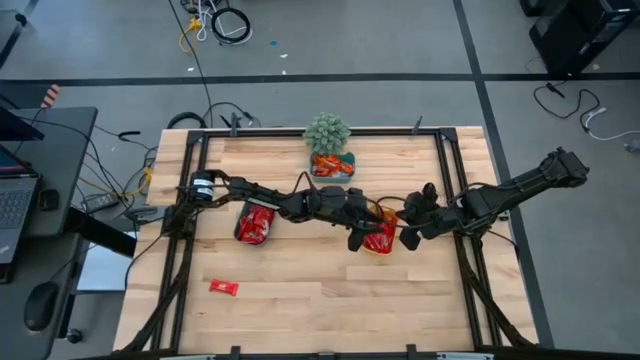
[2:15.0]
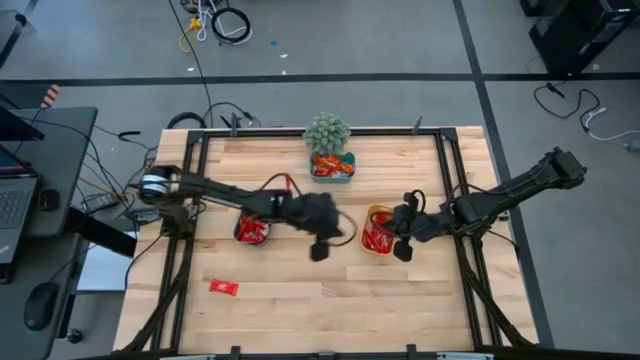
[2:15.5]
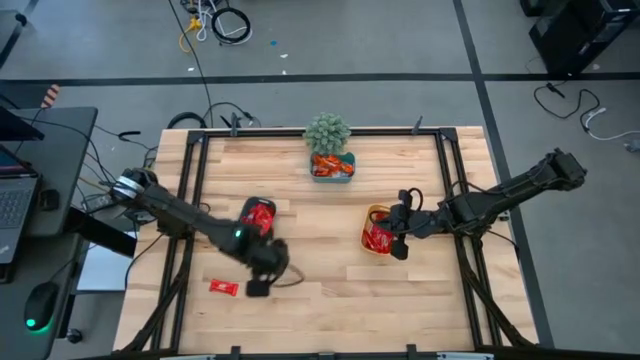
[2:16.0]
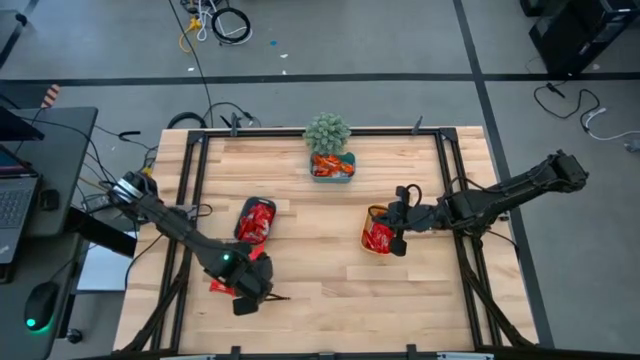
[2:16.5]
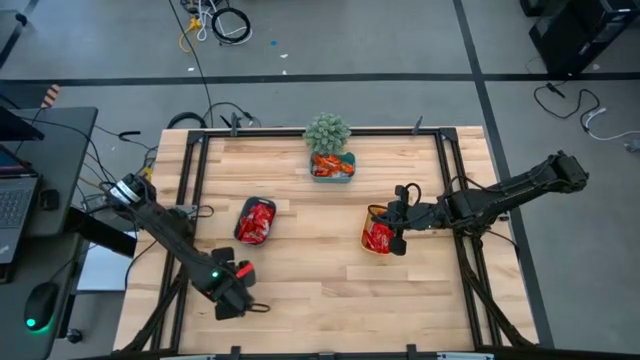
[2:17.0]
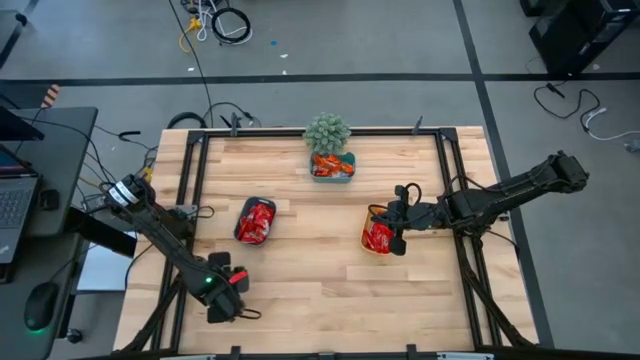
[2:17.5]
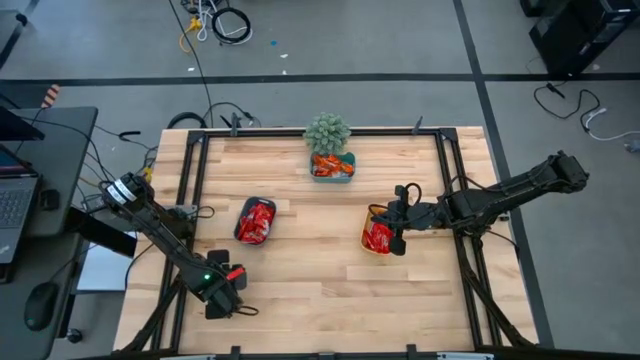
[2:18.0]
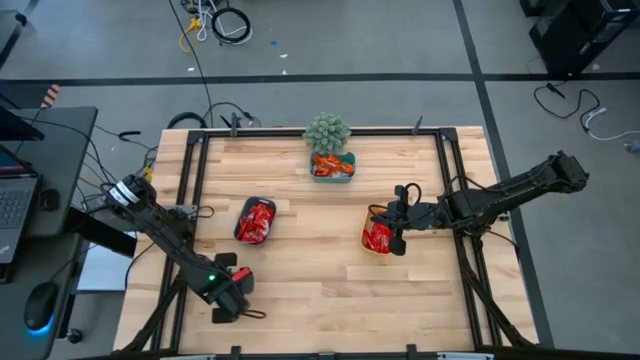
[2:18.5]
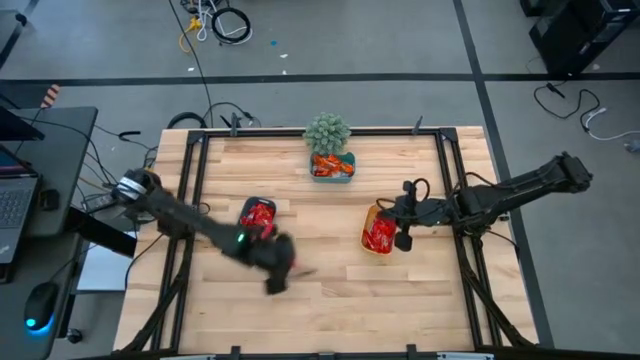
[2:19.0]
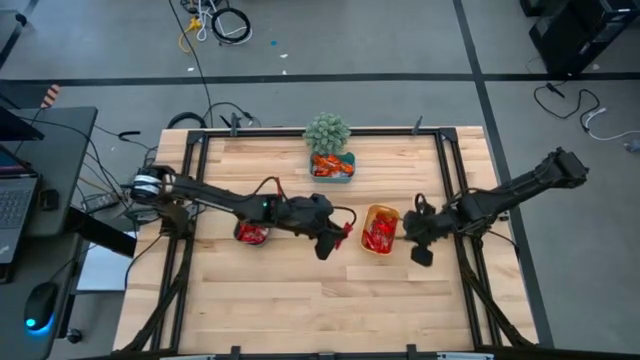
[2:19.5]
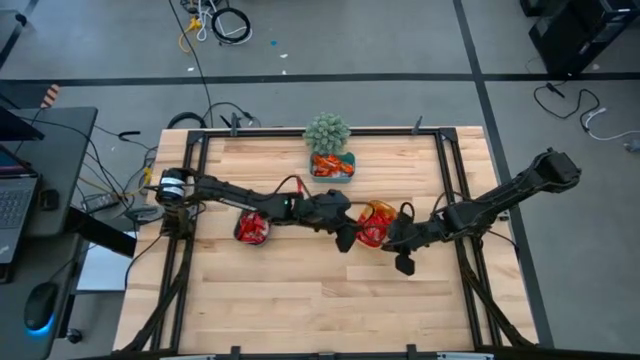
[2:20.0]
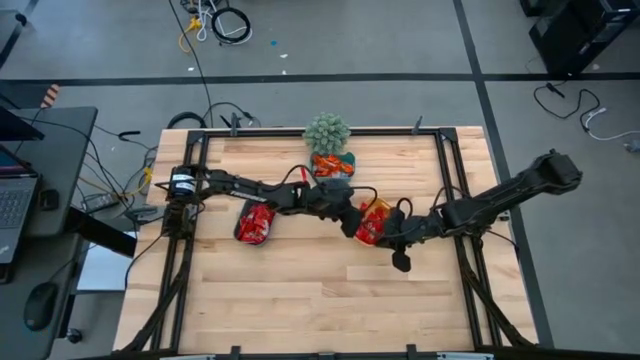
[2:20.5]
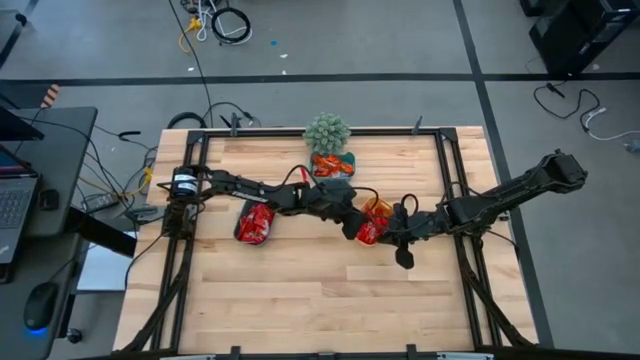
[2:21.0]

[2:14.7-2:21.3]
Task: Sort candy
Put the red chocolate into the yellow bin

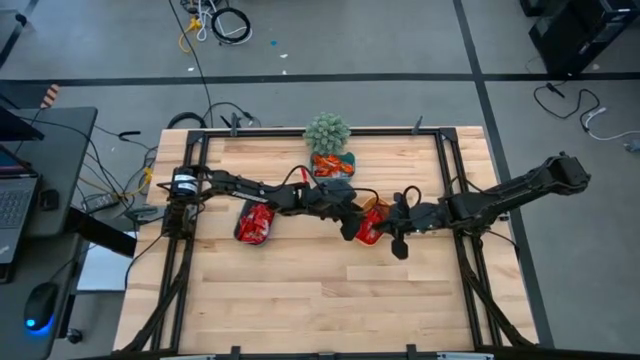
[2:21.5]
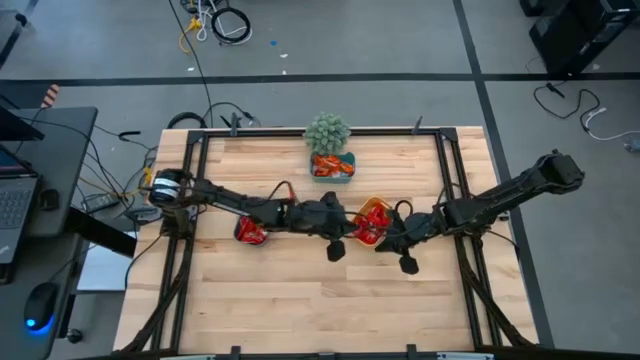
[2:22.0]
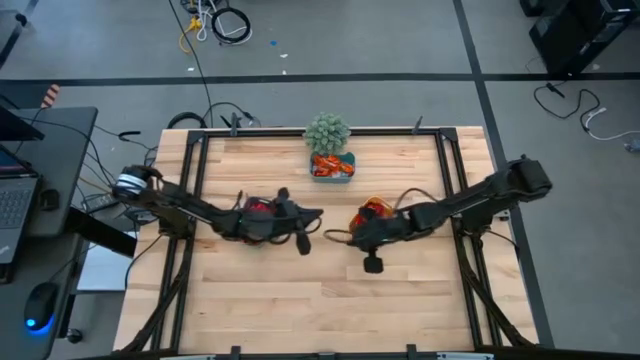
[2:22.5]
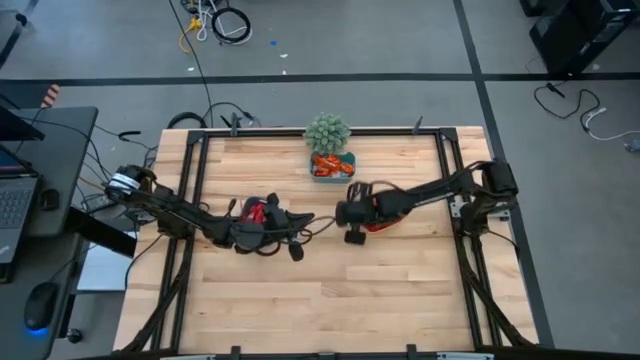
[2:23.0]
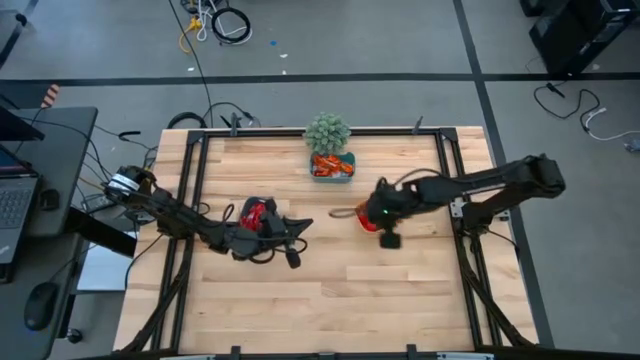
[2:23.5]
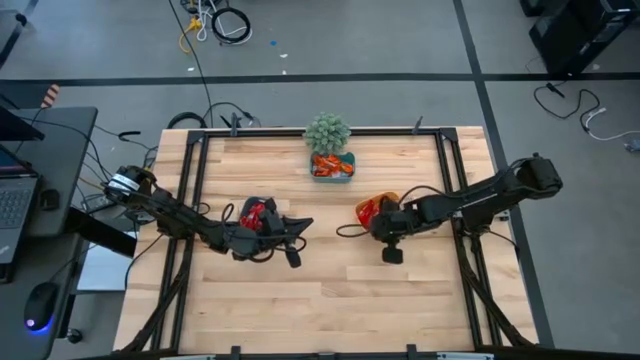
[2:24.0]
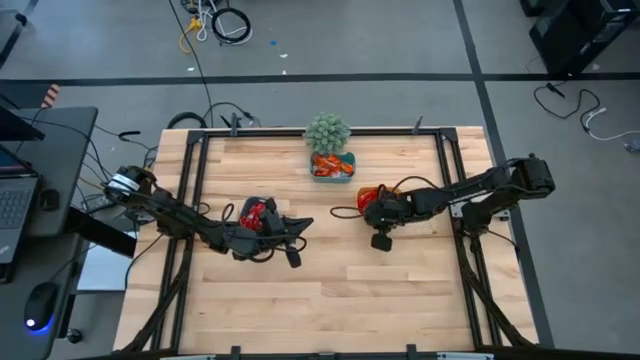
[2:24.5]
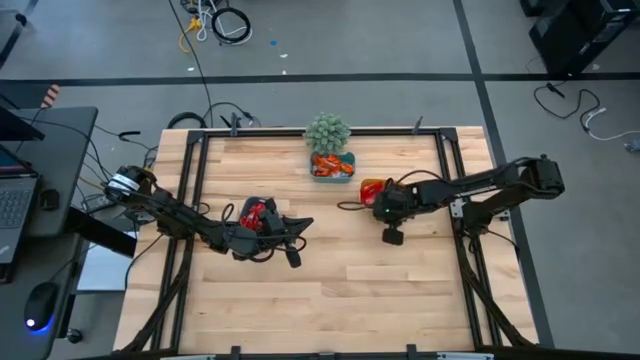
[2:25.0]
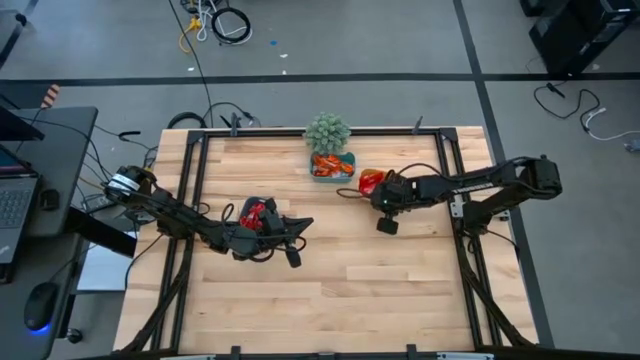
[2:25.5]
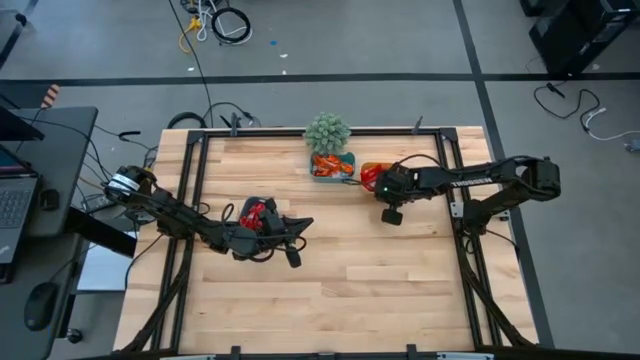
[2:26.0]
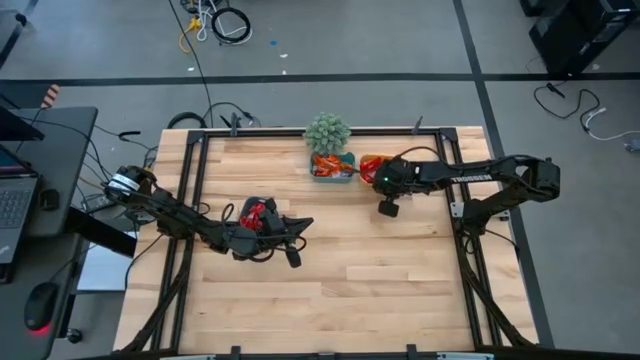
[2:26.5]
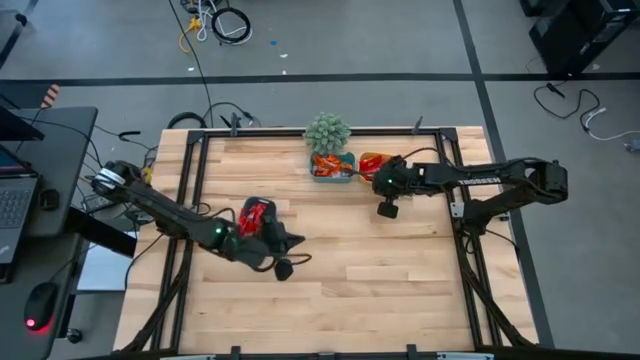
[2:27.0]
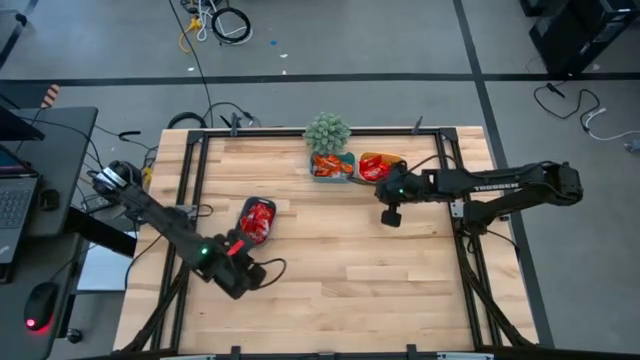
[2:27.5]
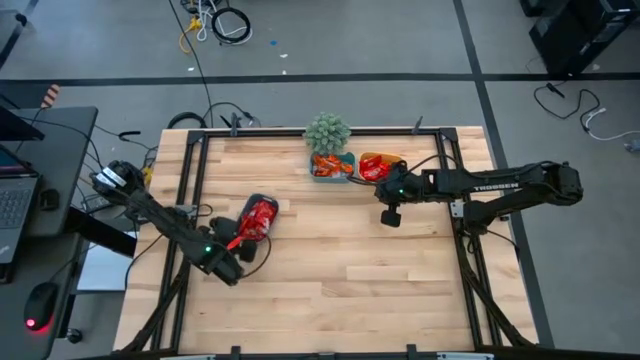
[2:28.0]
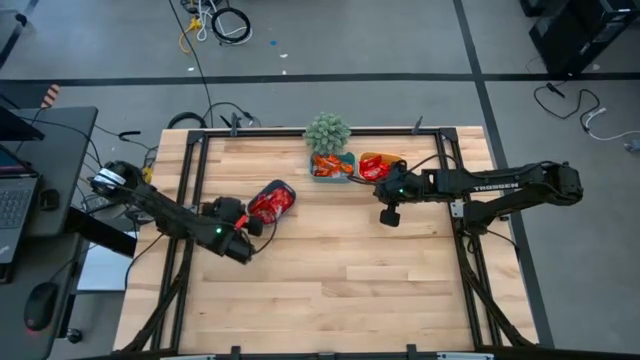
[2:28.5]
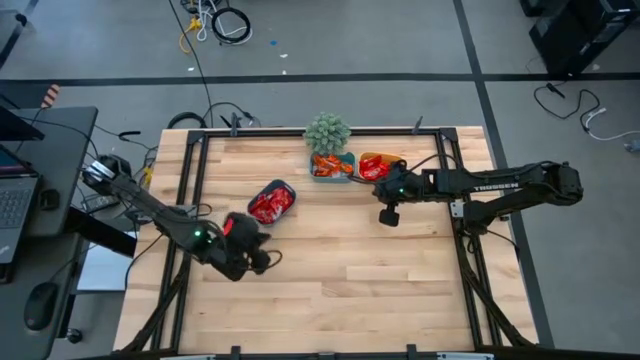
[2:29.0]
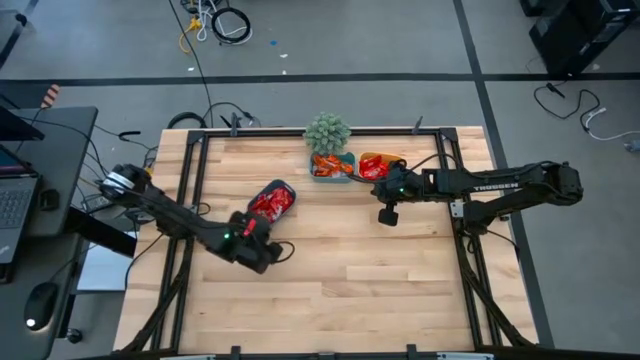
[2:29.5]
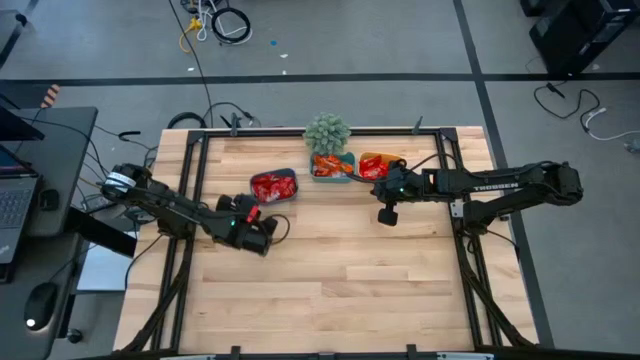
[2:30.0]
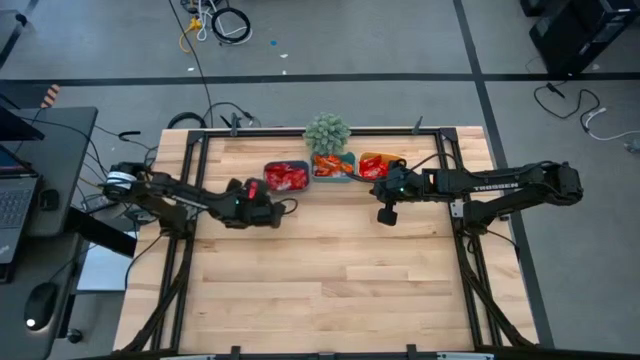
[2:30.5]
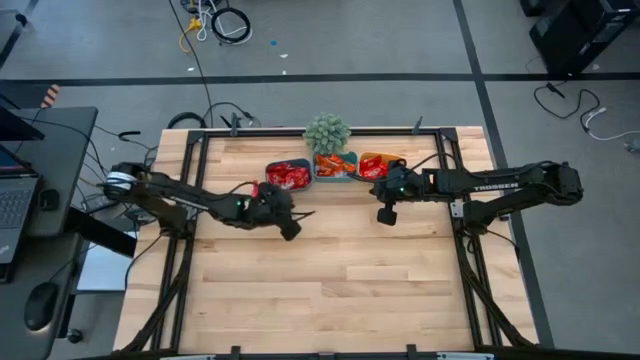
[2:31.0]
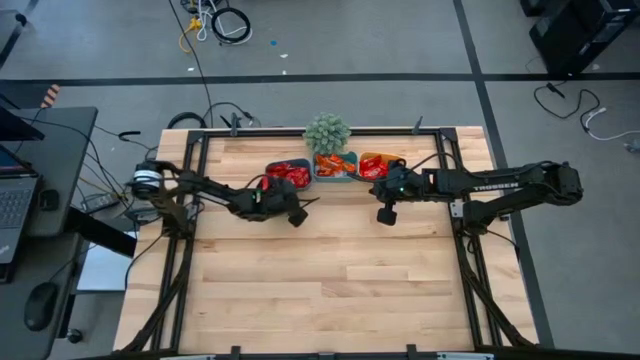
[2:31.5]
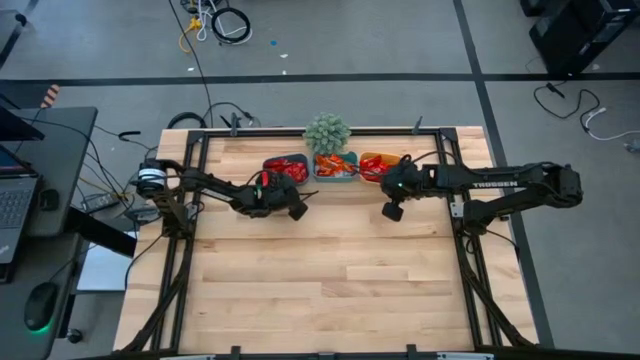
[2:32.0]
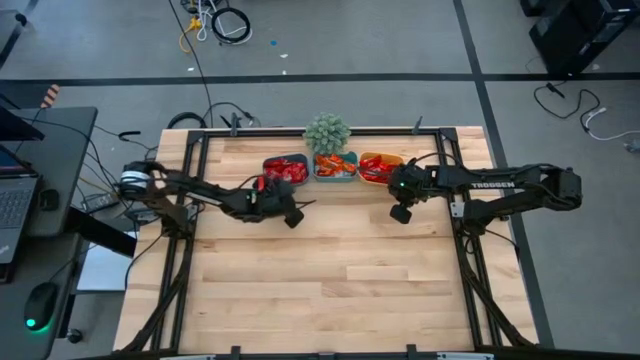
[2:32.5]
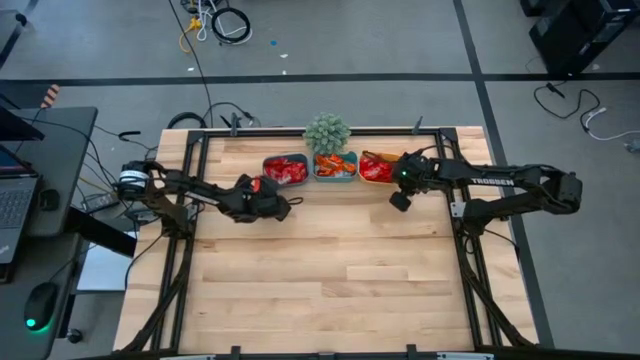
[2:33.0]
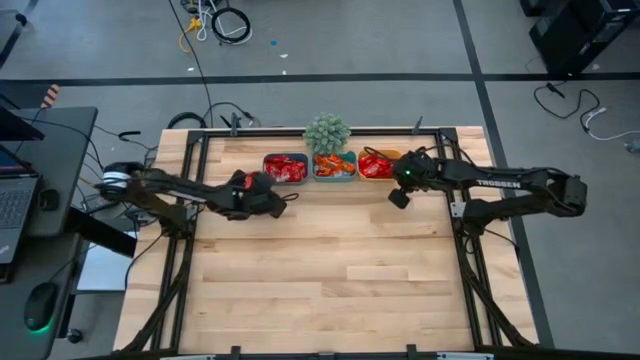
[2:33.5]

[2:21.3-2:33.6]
Move the blue bin and the yellow bin to the top corner of the table beside the green bin

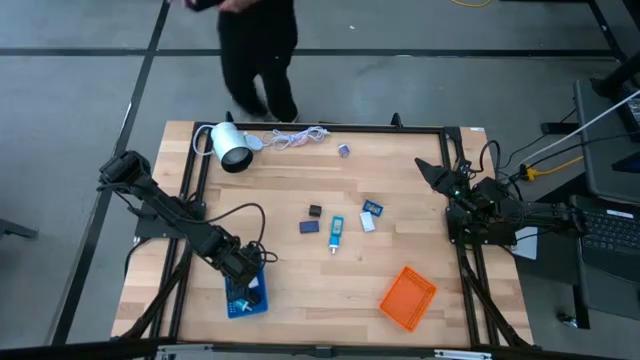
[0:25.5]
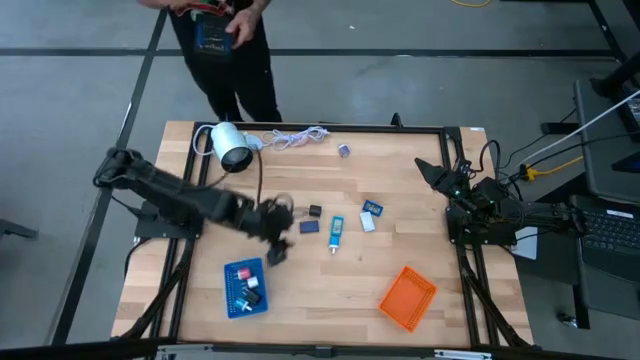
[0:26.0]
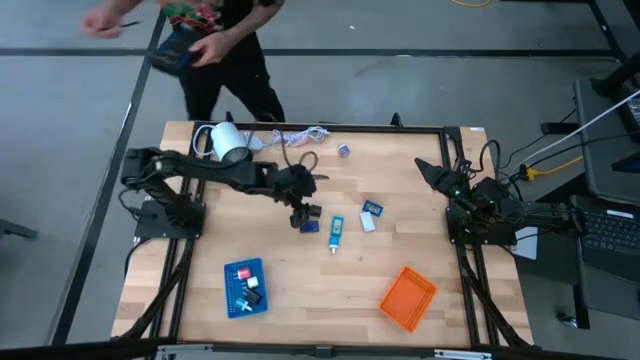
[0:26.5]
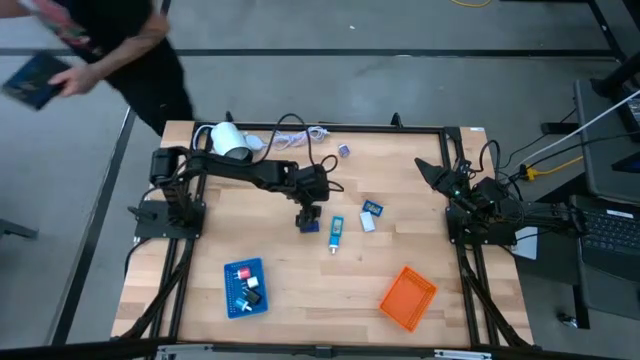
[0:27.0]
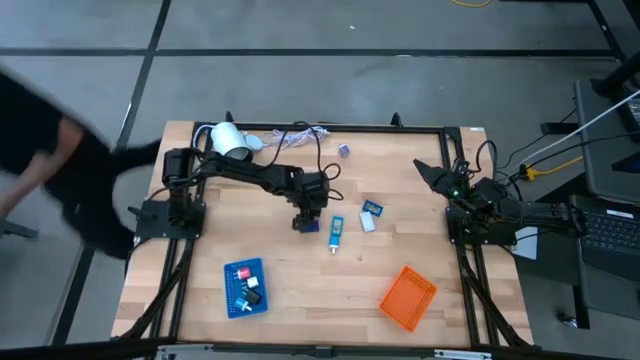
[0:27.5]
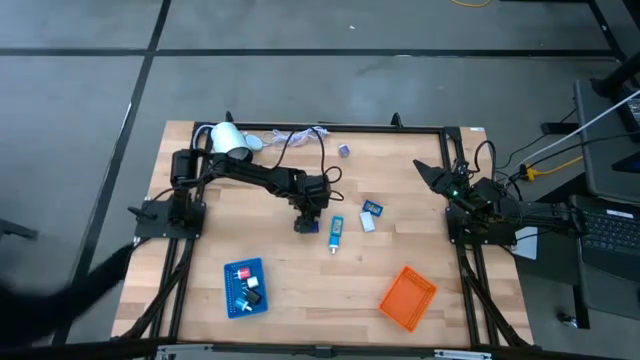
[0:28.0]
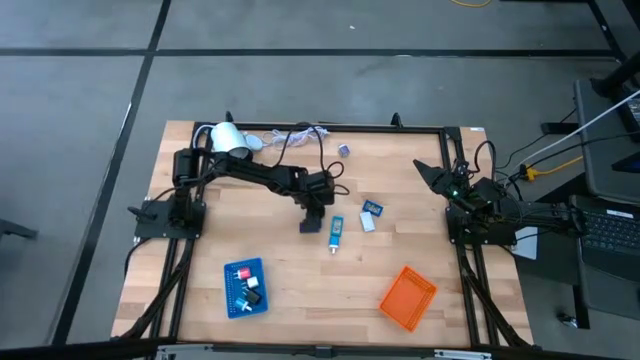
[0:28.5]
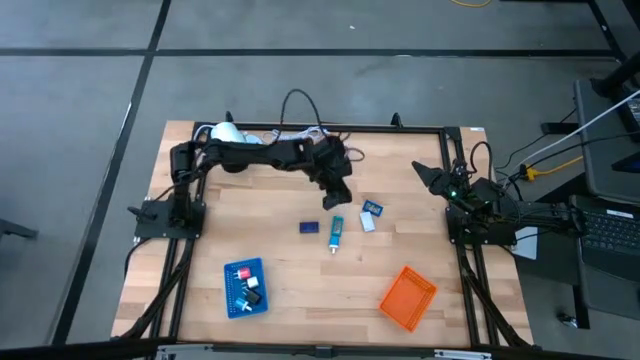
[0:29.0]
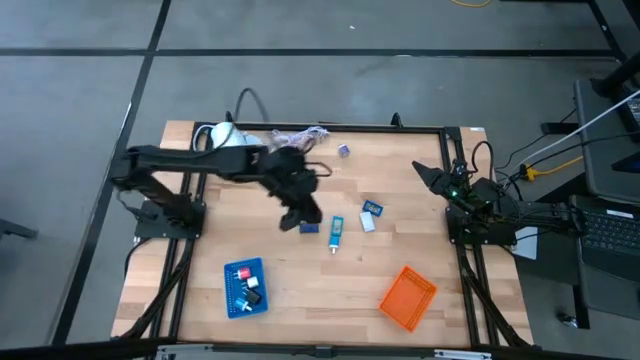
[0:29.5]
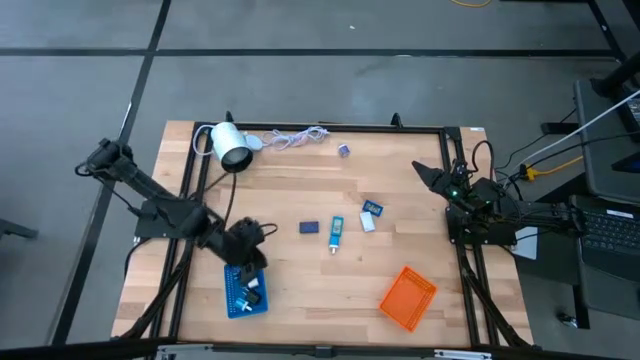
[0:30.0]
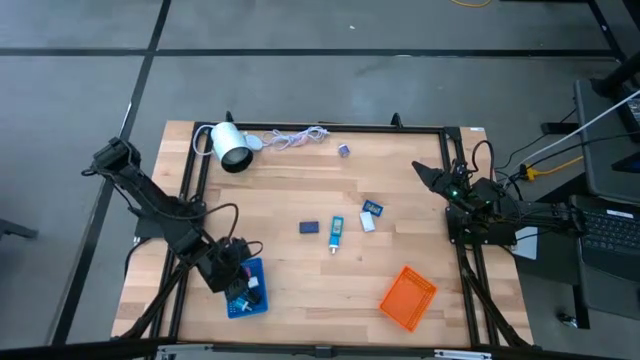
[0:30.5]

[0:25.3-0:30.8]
Task: Pick & Place Office items
Put the black charger adapter into the blue basket
